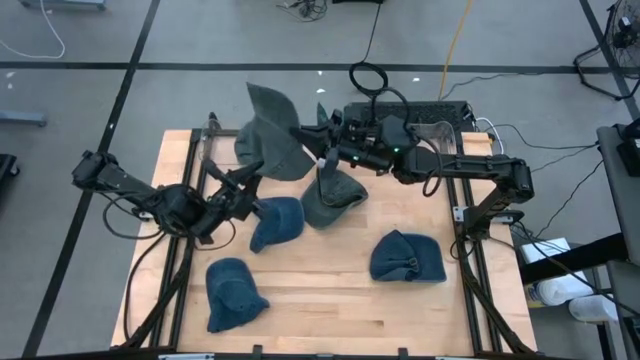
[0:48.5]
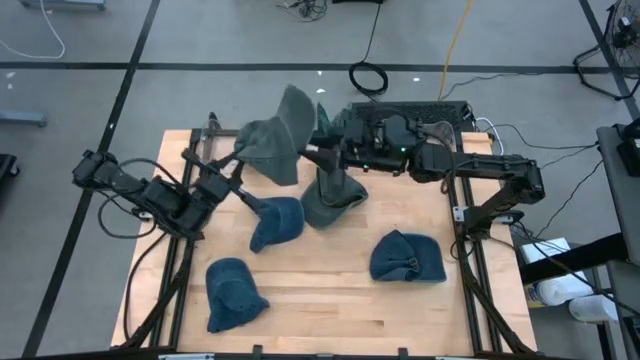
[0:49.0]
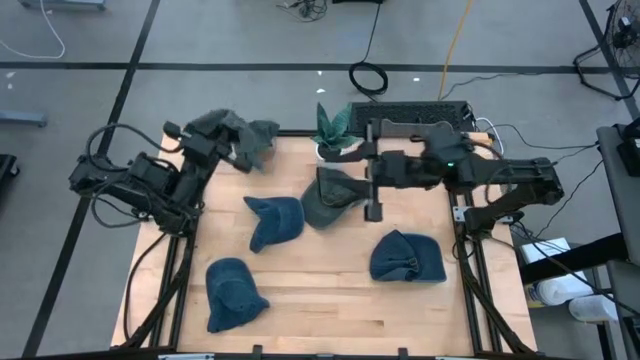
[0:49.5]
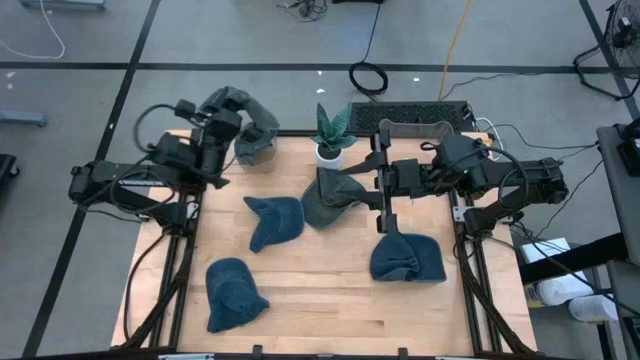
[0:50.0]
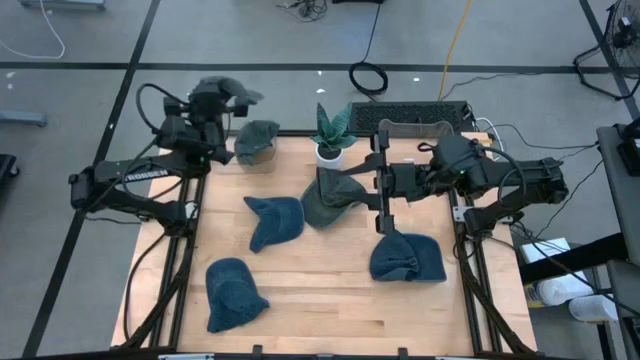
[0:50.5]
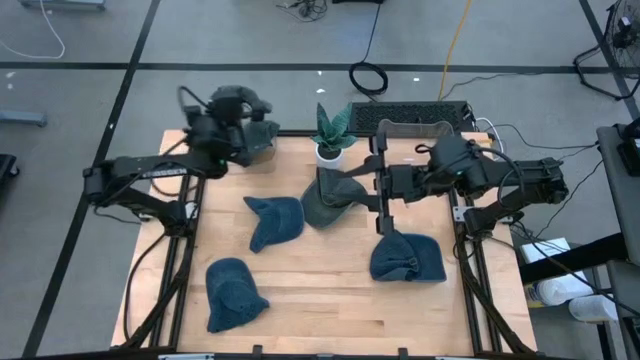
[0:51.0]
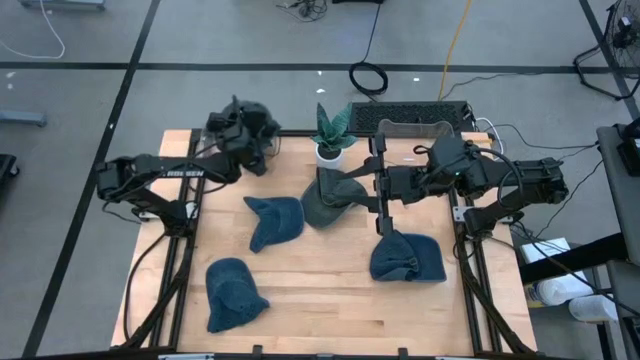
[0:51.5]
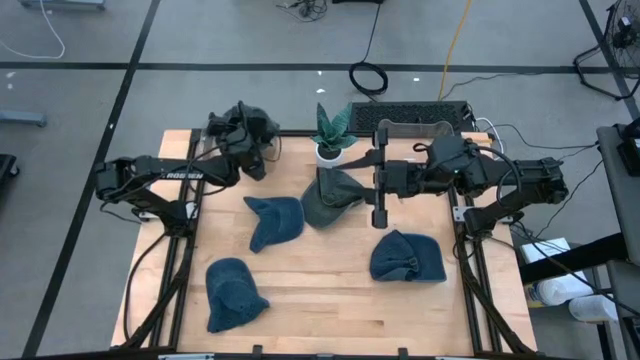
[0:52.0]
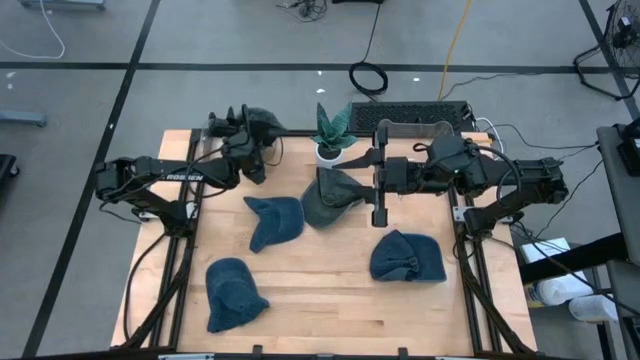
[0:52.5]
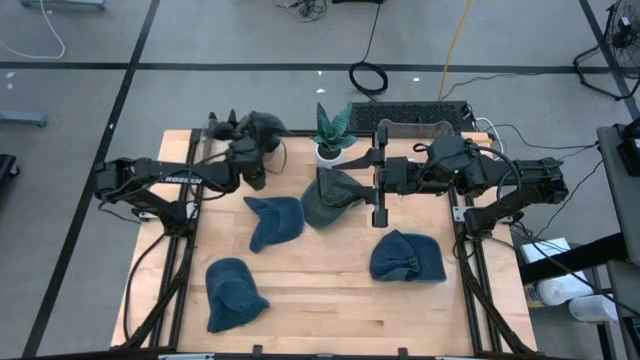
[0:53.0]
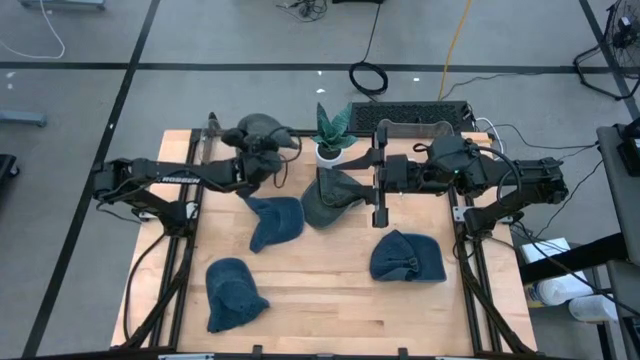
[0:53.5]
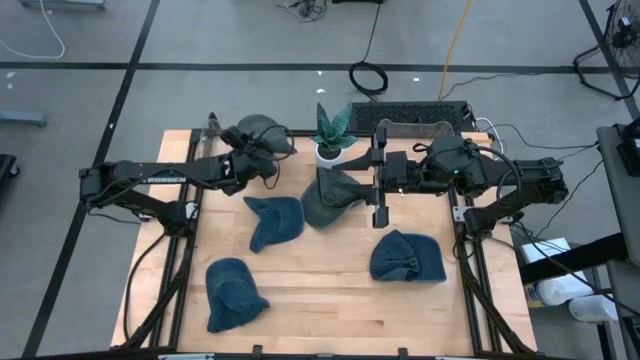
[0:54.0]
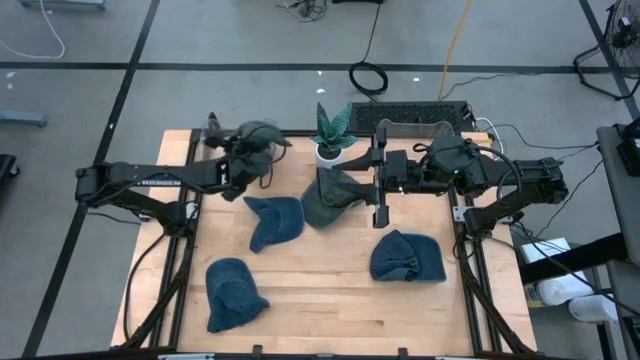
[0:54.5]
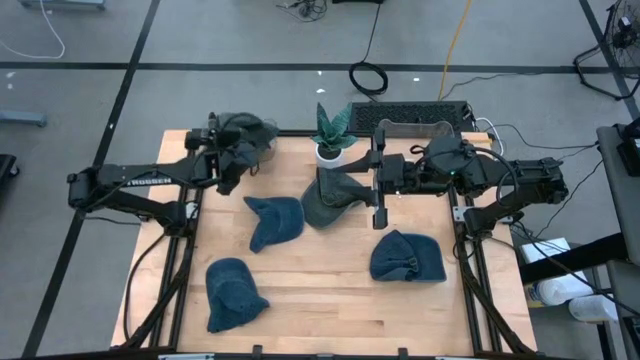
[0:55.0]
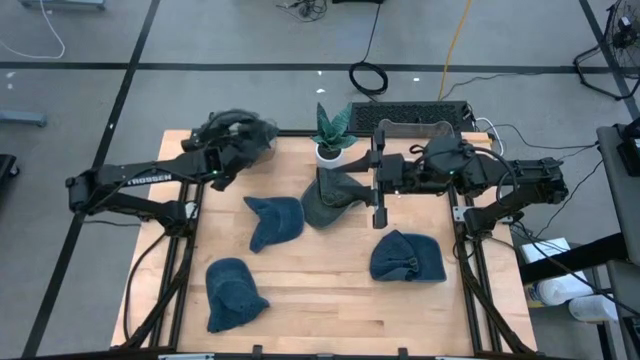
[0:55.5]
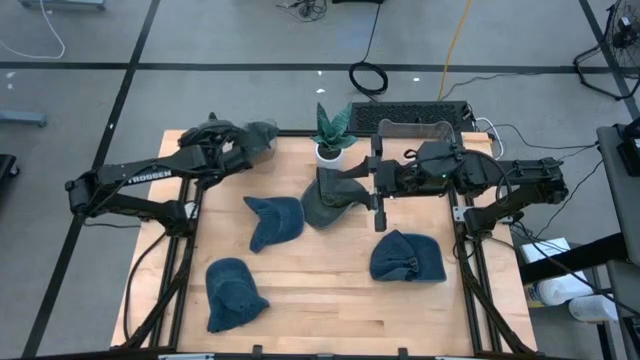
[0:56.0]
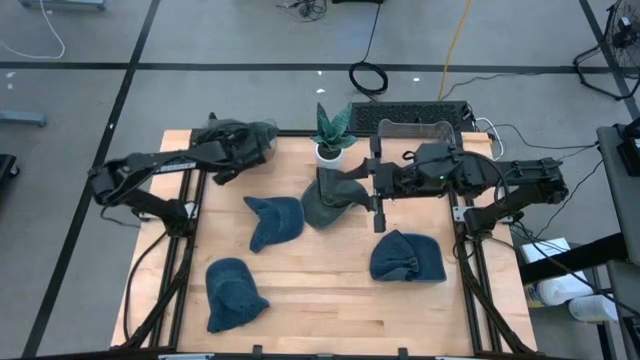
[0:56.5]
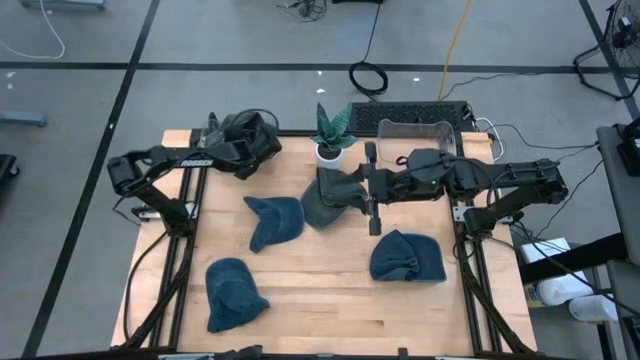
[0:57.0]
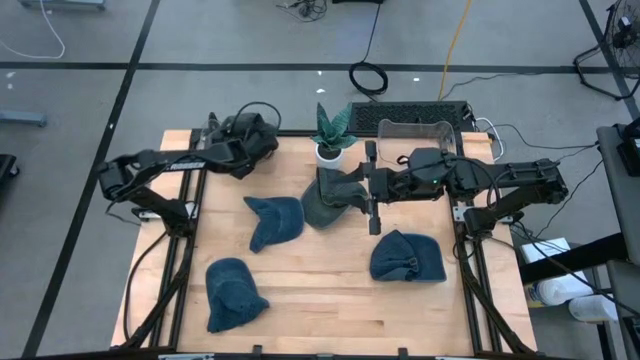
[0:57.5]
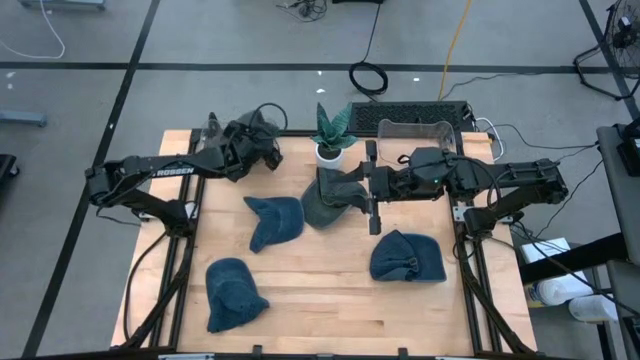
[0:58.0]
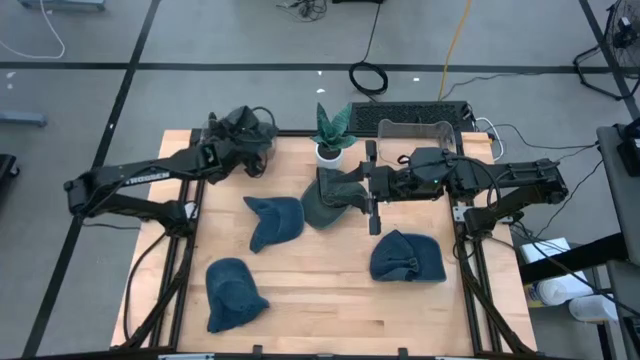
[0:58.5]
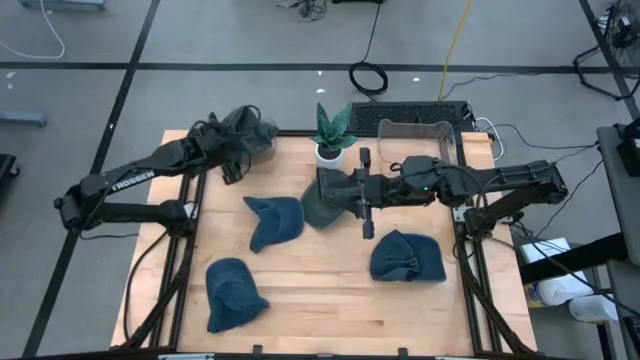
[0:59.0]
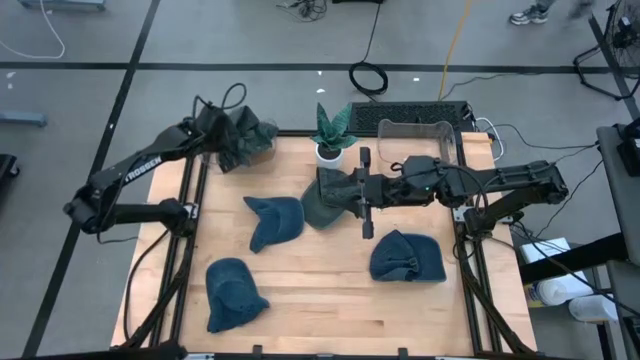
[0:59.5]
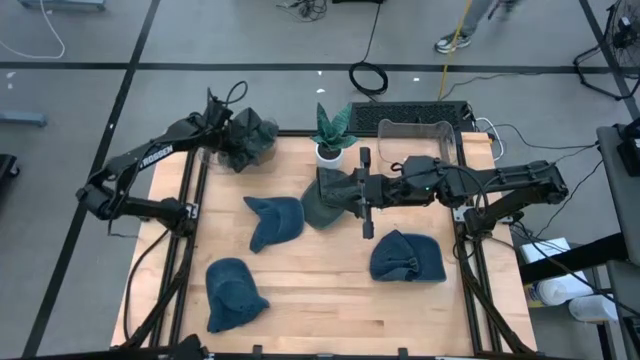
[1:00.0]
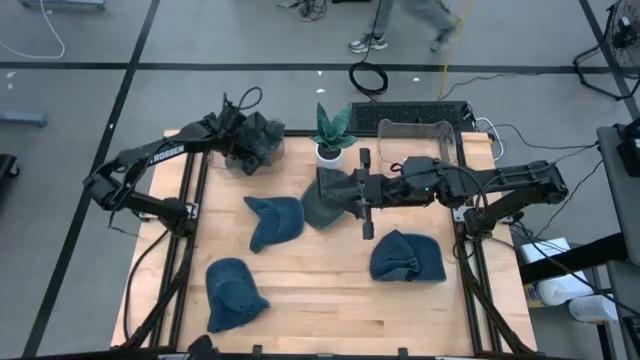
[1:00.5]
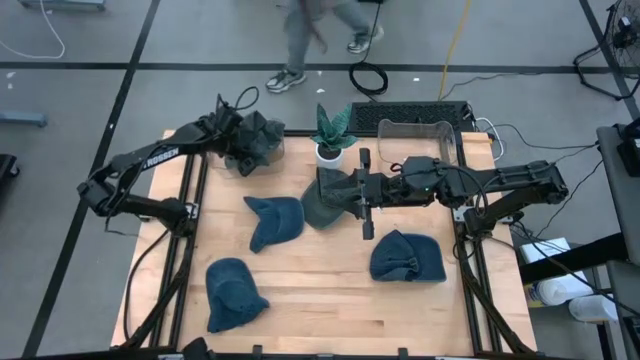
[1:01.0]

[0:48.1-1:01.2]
Task: Pick & Place hat
Put the right green cap into the left transparent bin

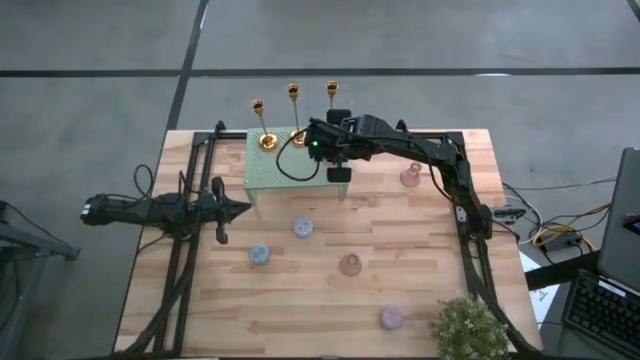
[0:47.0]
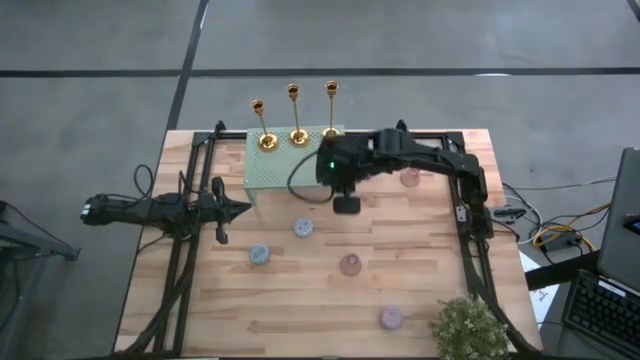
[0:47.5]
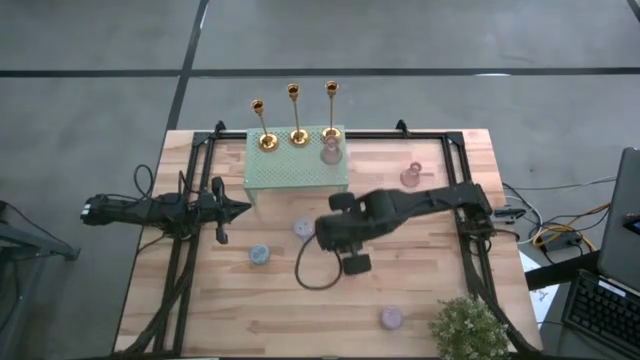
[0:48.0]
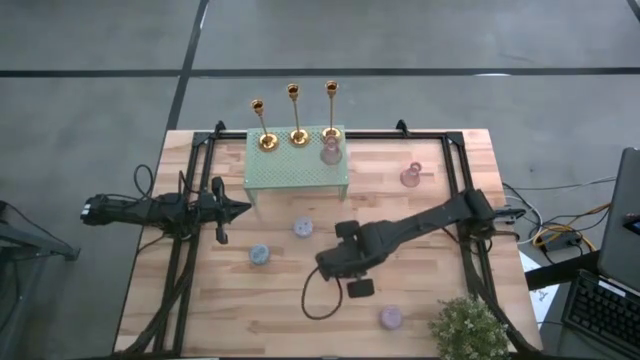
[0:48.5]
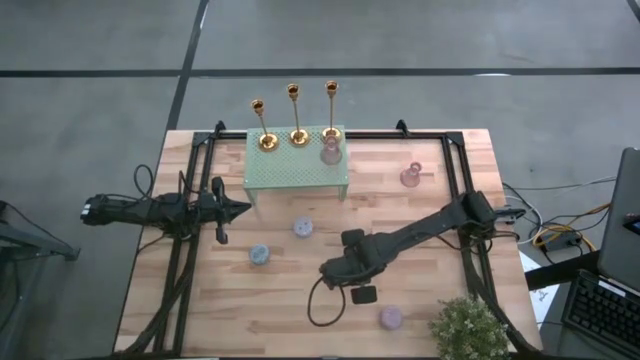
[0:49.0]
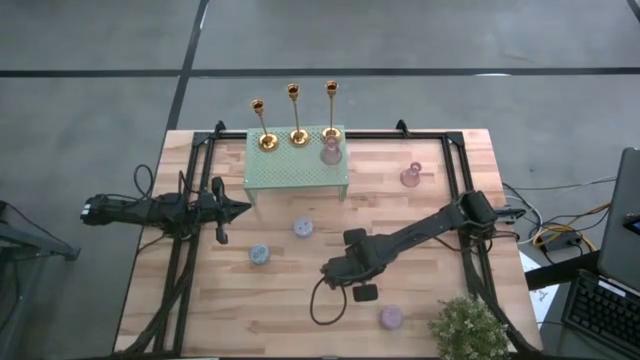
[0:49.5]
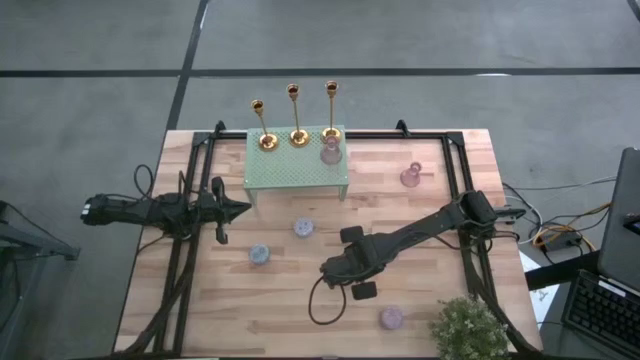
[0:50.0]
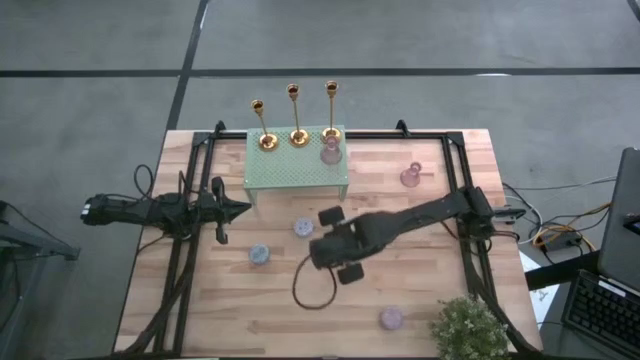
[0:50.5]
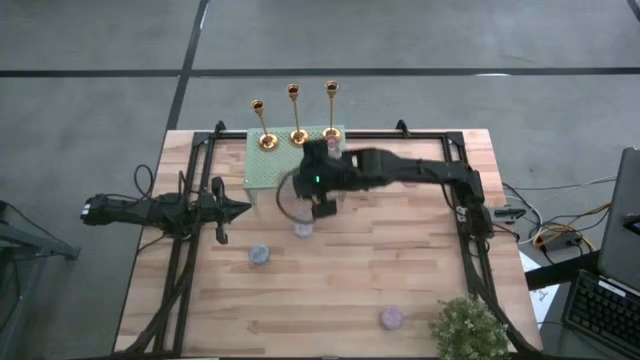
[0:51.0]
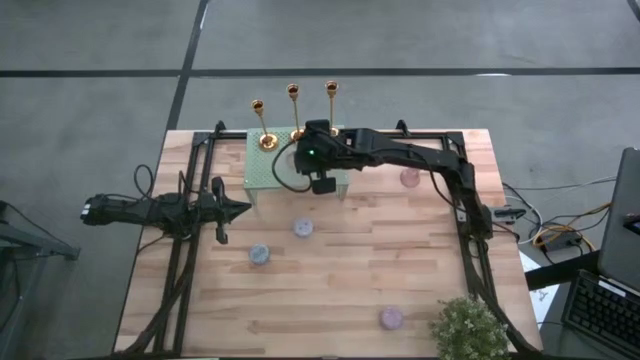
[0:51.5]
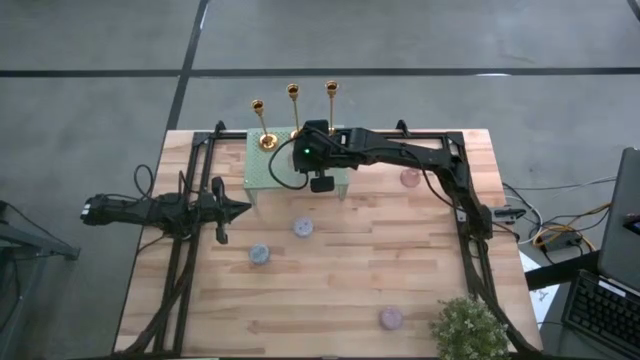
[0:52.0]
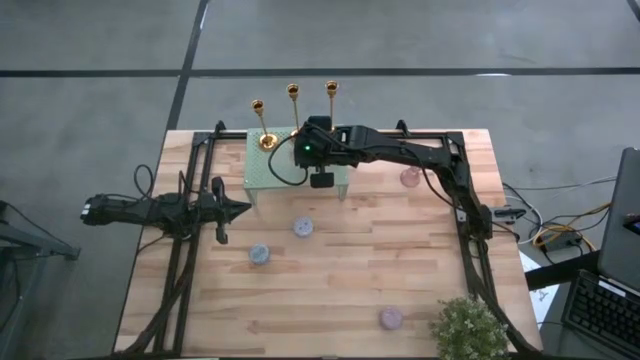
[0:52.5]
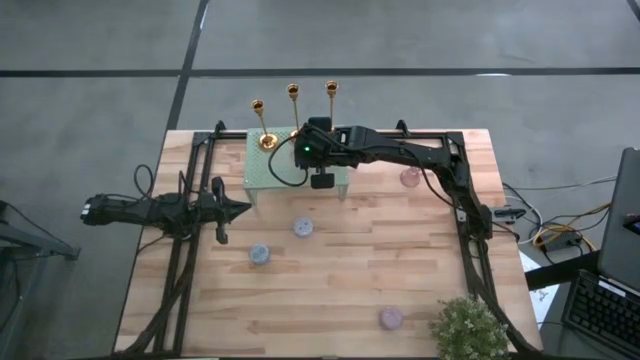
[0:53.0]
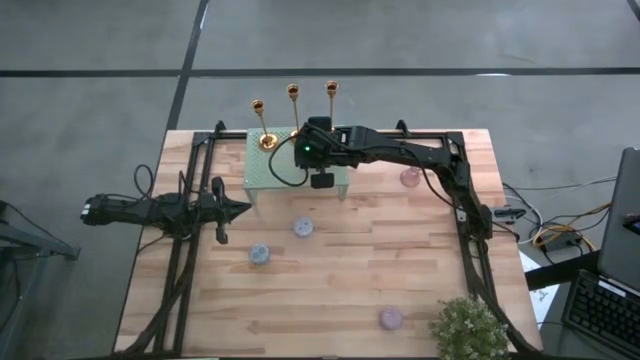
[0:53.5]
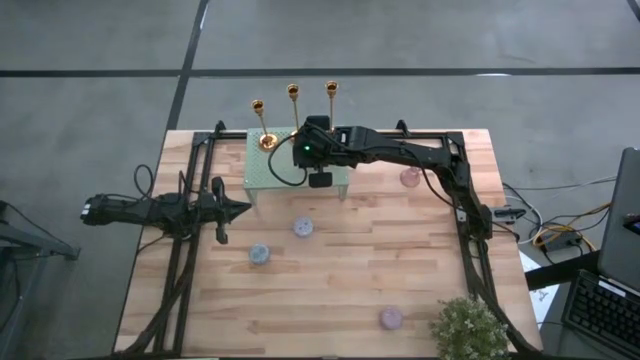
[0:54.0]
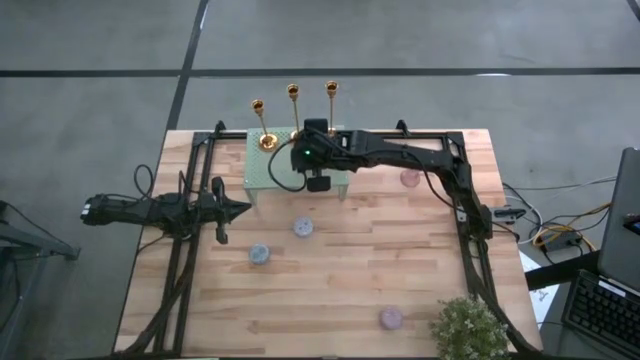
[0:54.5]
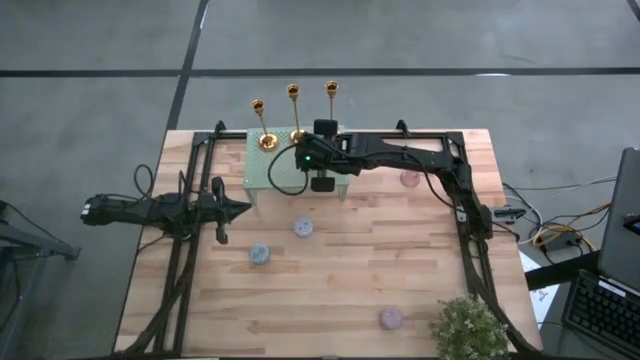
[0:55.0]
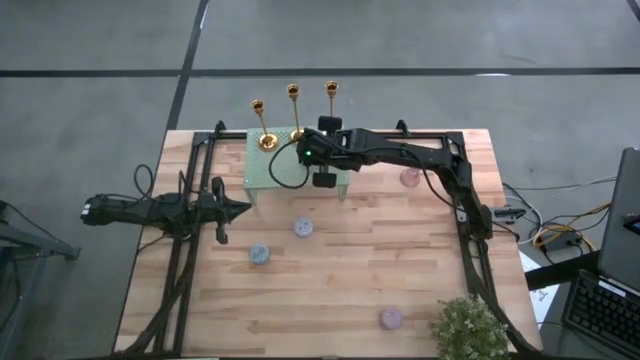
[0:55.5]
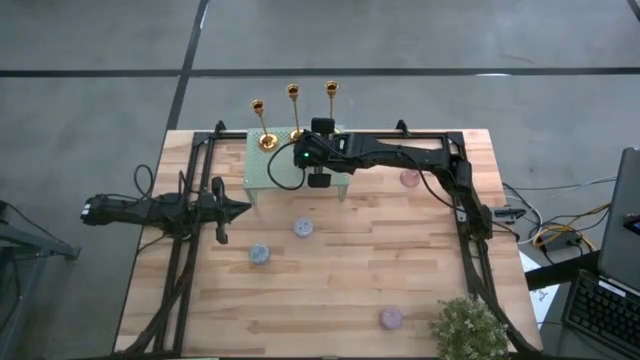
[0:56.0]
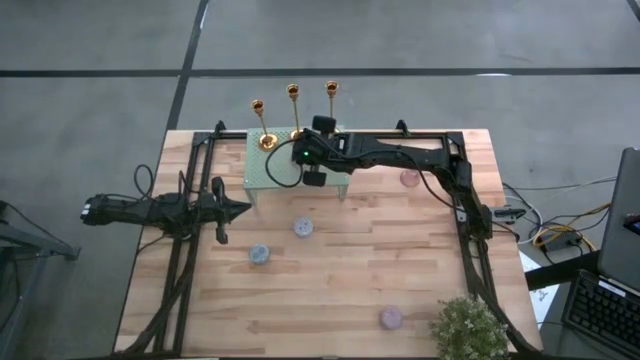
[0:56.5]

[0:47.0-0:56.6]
Task: Pick & Place candle stick holders
Put the bottom pink glass candle holder on the shelf
